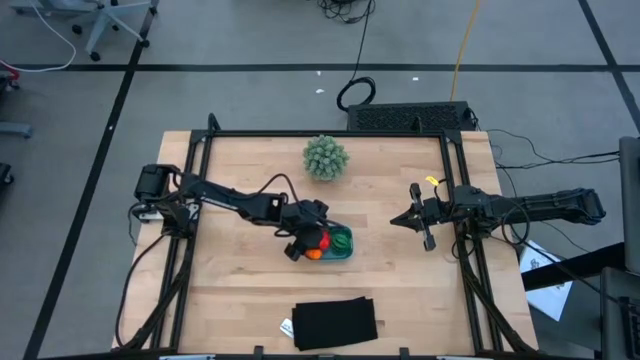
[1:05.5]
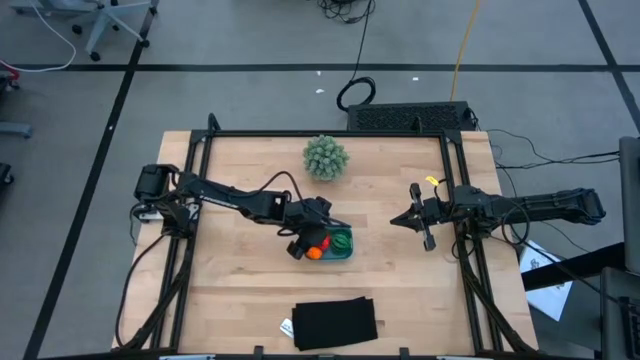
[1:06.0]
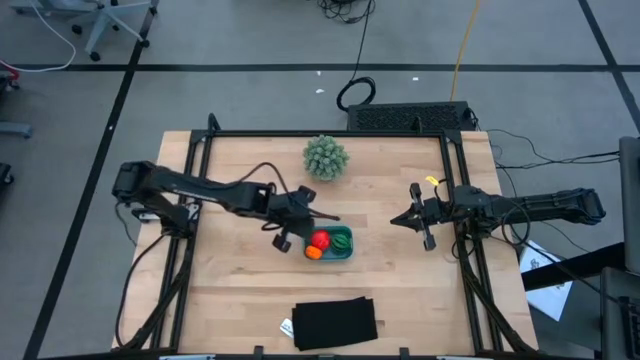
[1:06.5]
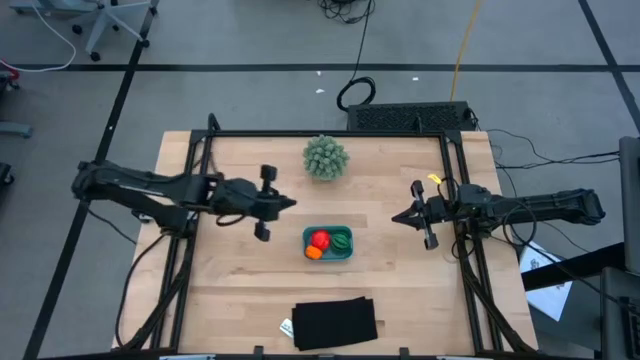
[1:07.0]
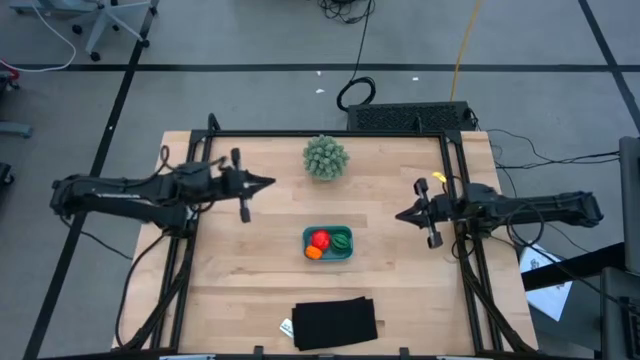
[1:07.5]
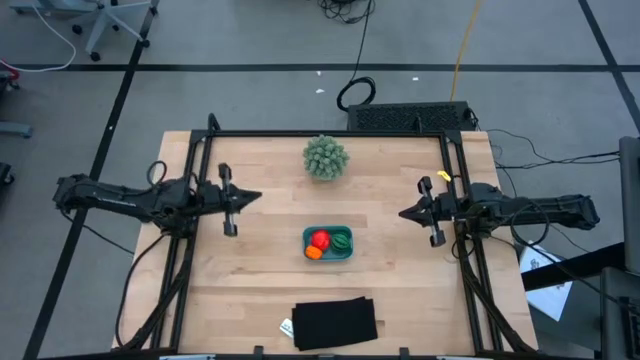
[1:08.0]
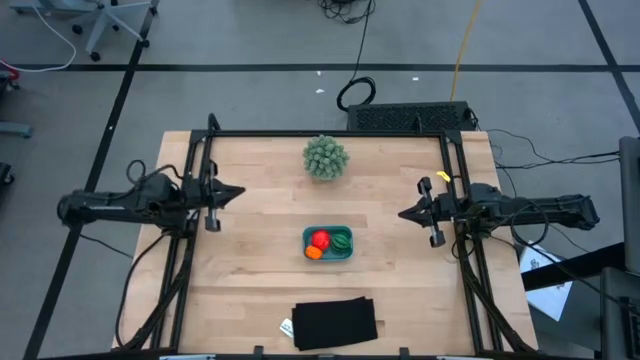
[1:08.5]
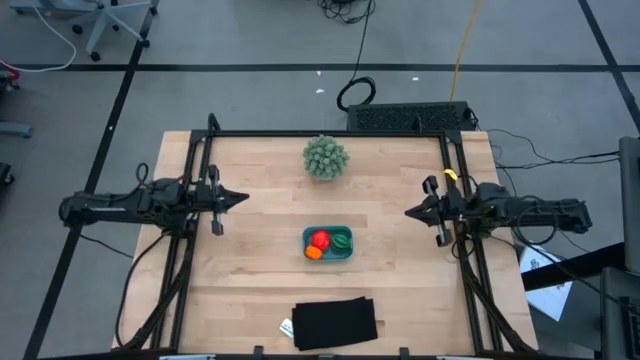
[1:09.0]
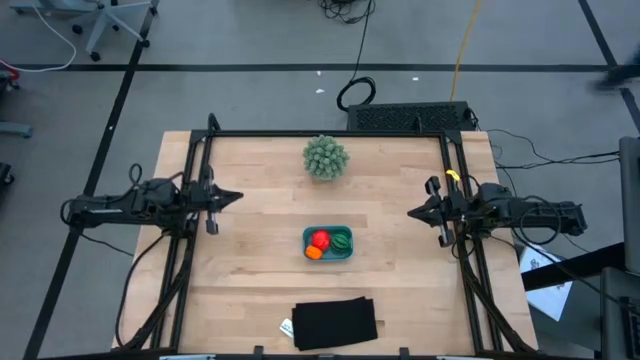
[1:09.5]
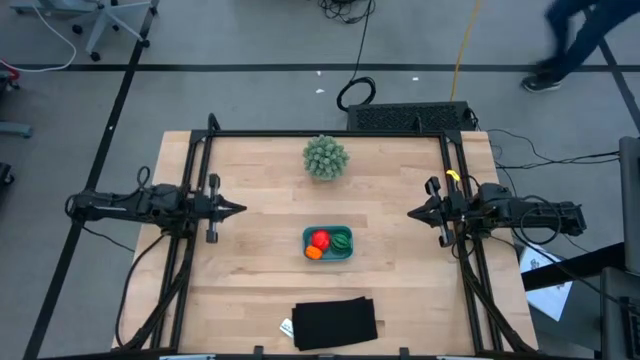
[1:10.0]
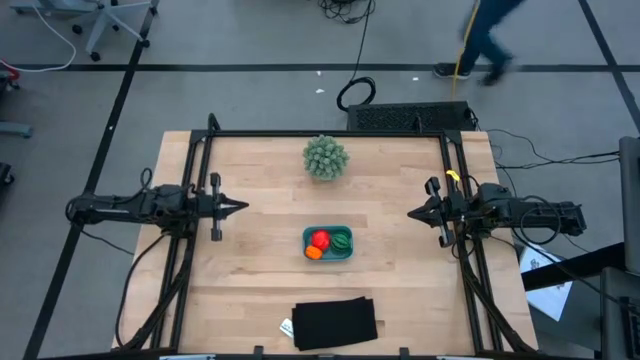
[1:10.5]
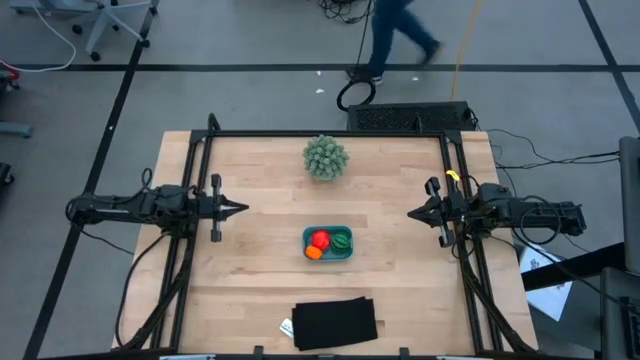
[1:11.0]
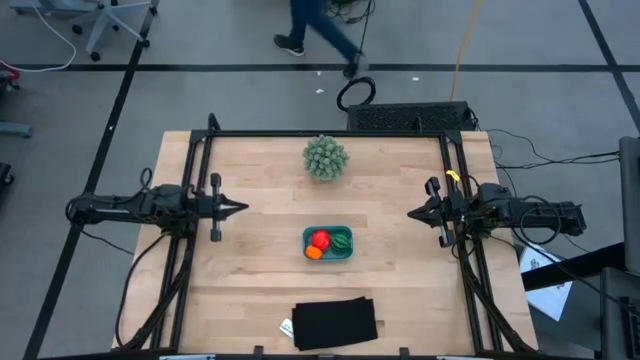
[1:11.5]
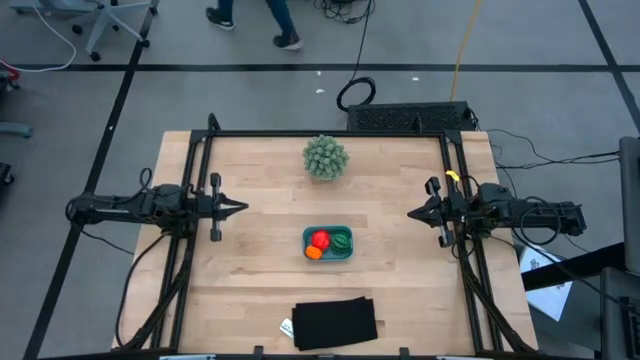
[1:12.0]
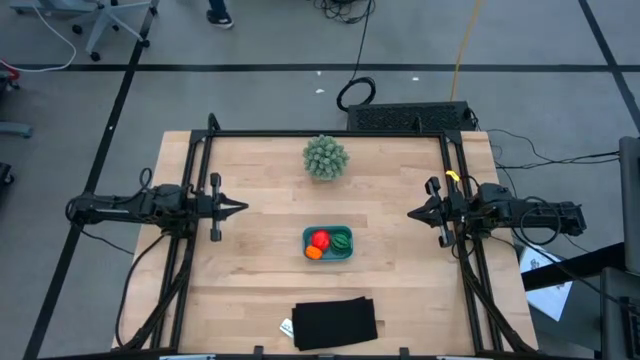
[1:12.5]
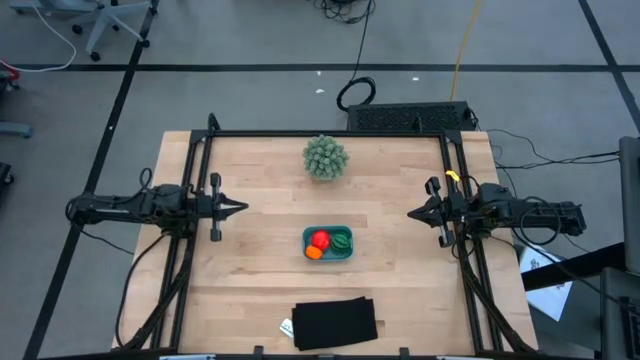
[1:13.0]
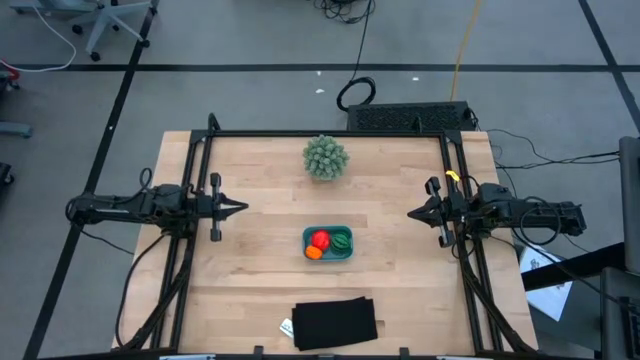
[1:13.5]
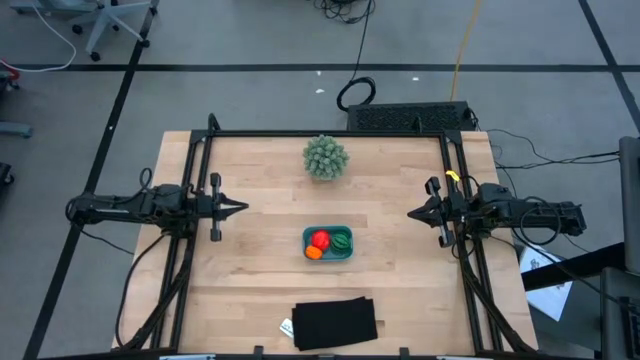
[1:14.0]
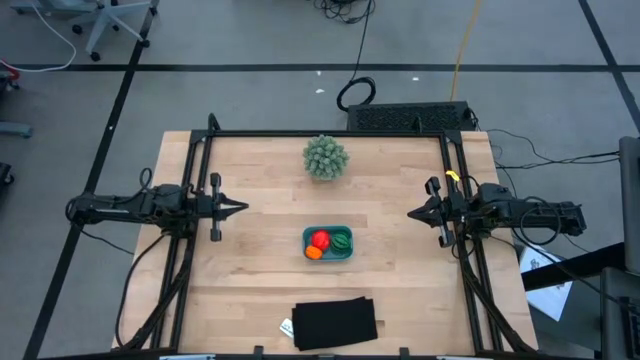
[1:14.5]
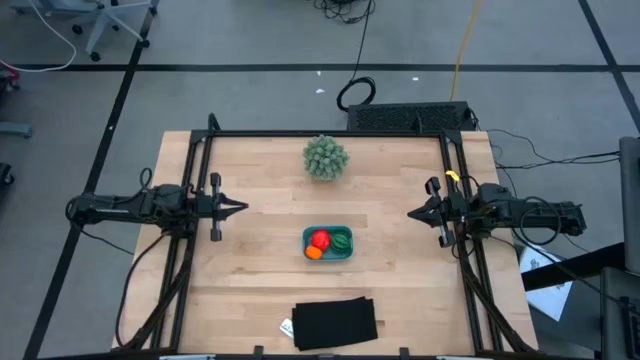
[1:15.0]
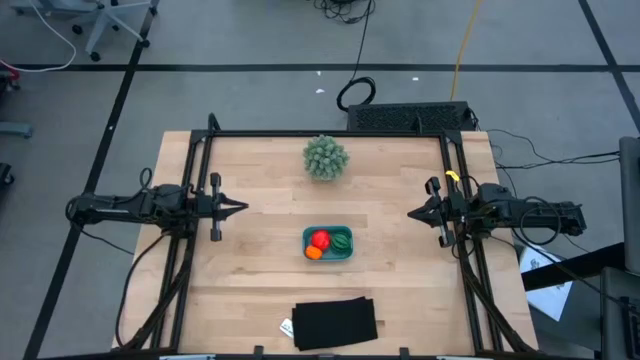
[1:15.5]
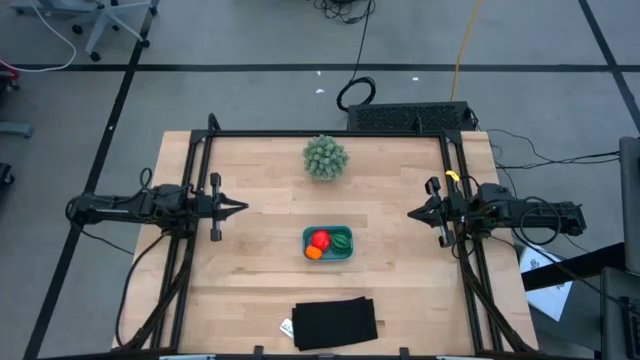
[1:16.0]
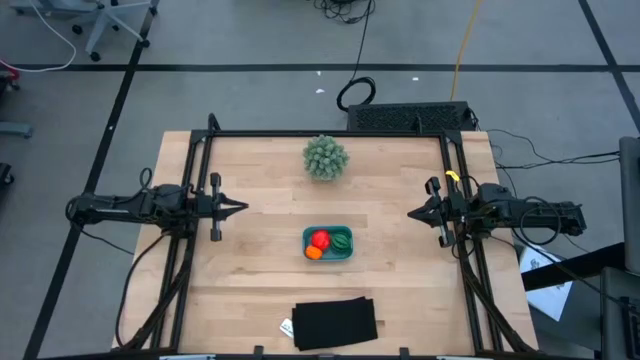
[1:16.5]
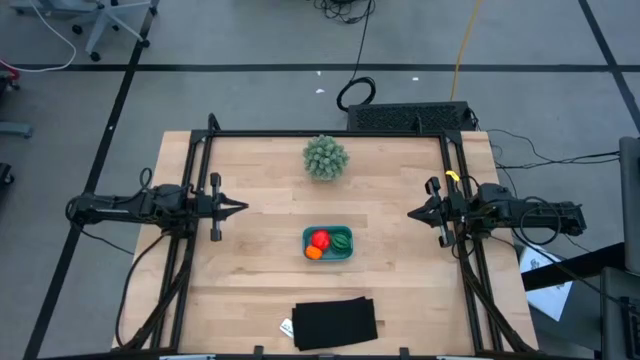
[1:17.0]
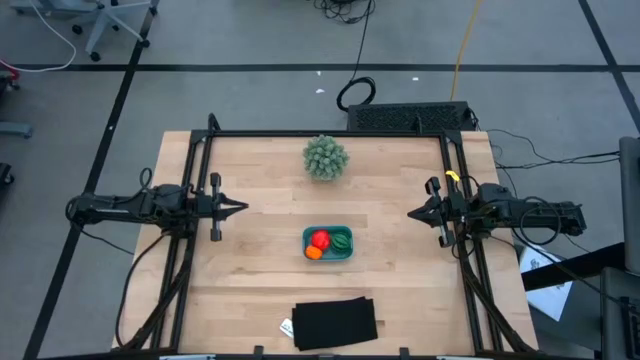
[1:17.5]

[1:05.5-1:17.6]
Task: Pick and placing Produce into tupperware
Return to Home Position

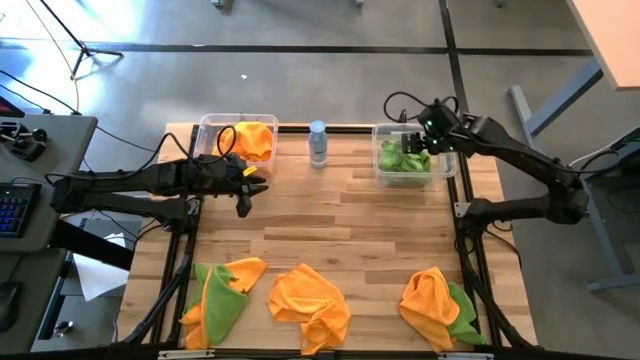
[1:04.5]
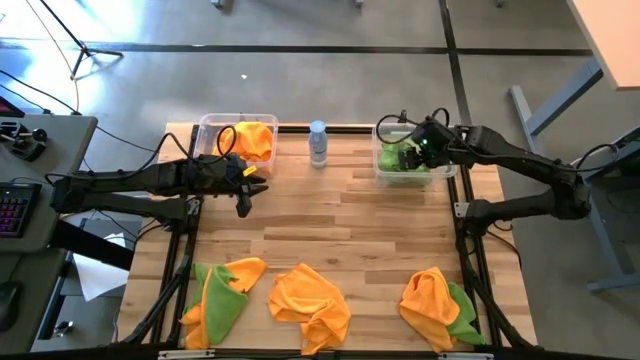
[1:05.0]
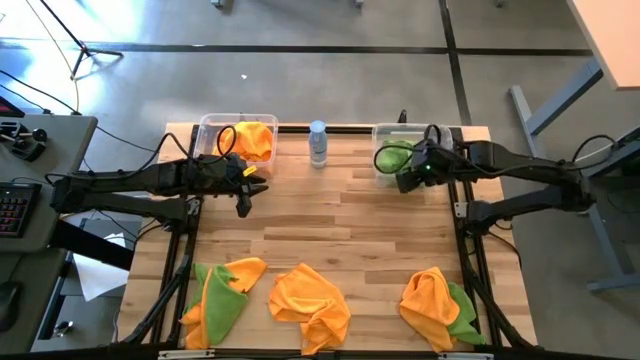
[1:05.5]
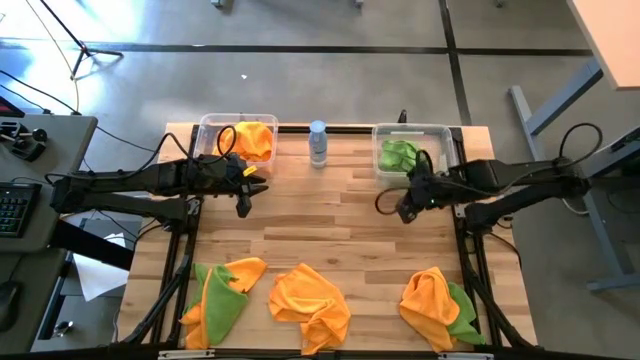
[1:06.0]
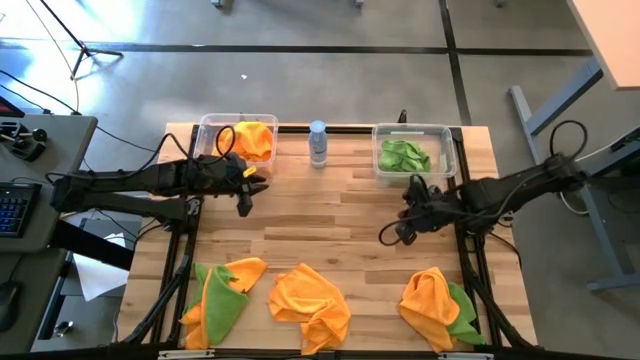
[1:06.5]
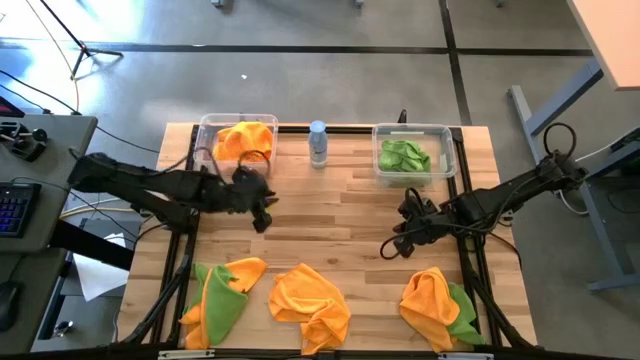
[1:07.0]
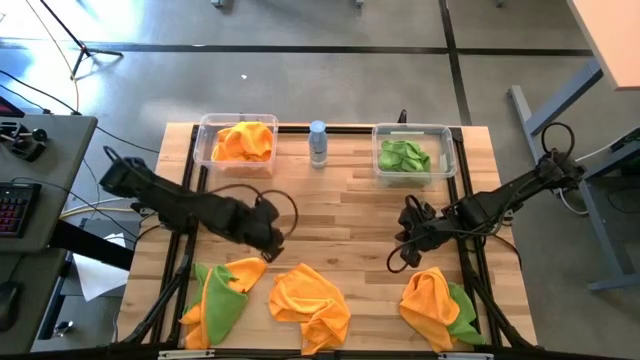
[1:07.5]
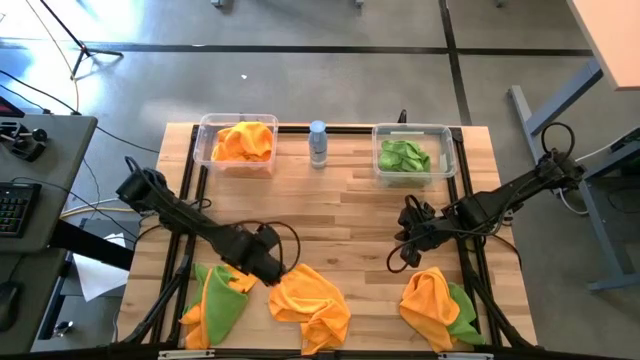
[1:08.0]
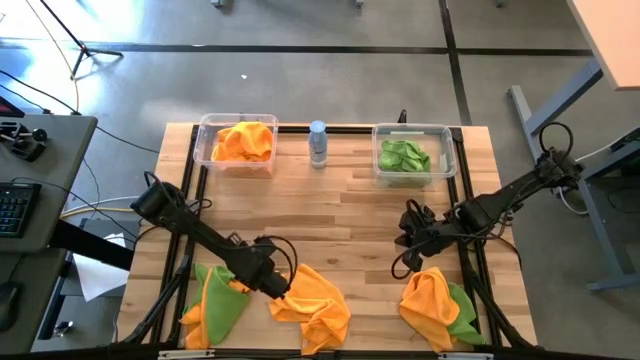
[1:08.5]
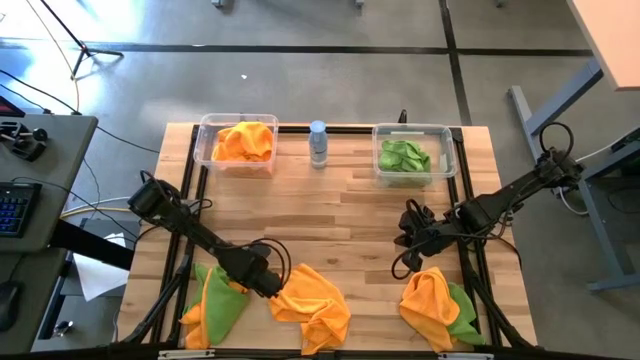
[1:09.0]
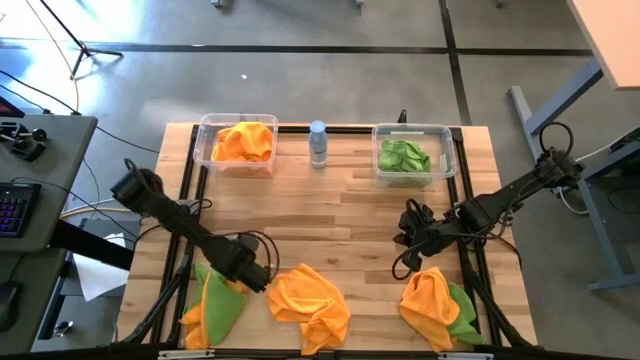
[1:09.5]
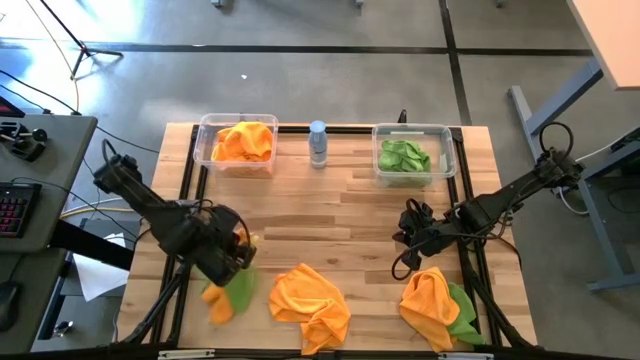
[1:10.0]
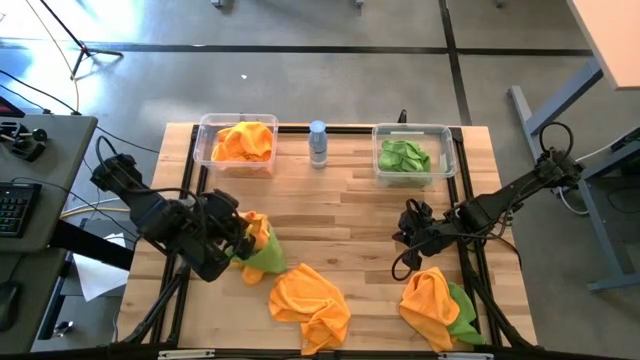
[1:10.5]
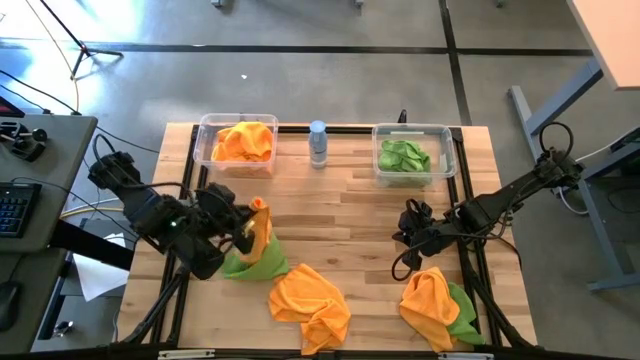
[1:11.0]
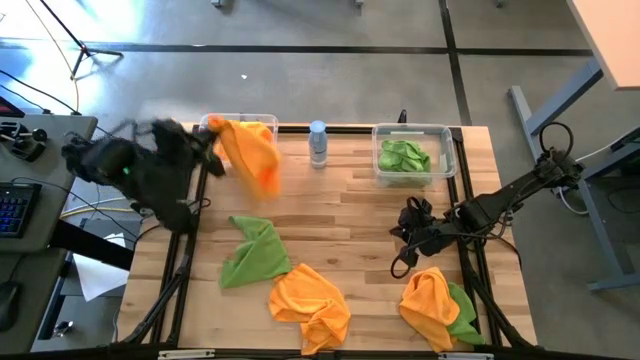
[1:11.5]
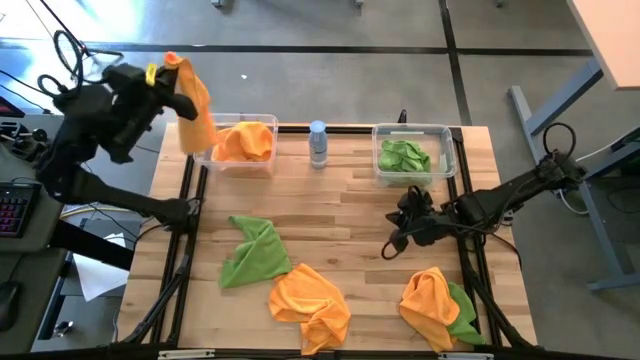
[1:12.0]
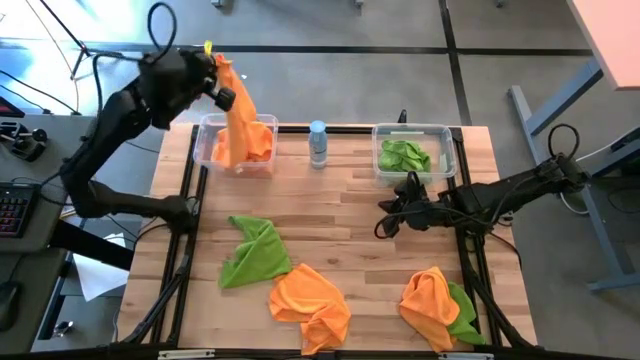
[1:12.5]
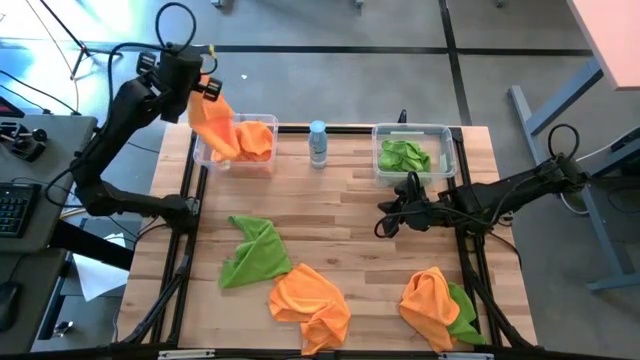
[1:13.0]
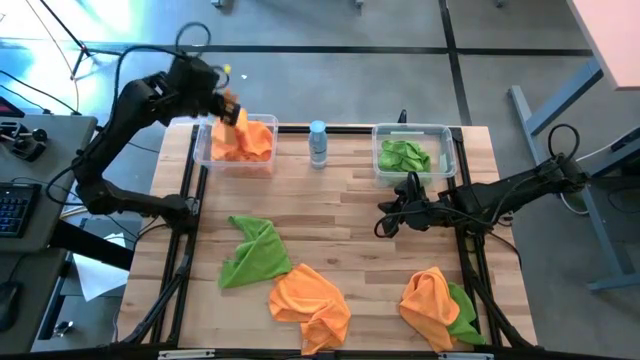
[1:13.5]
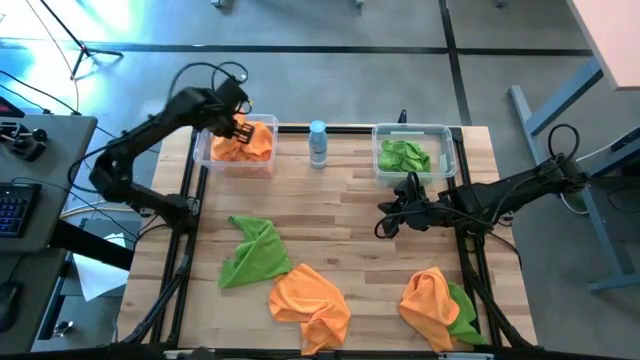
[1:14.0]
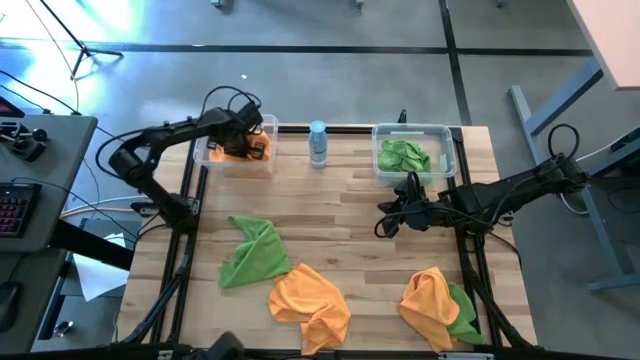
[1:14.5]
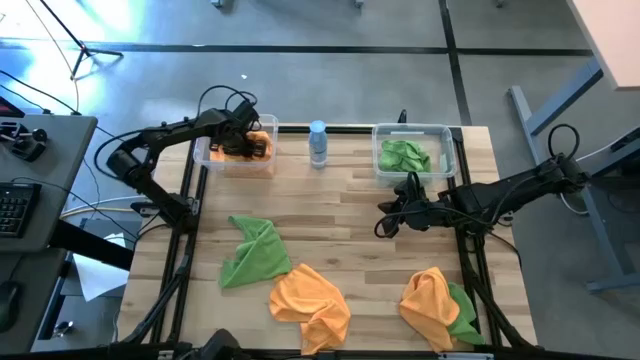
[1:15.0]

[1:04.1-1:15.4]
Task: Sort microfiber towel by color & place in baskets
Put the orange towel into the left transparent bin
